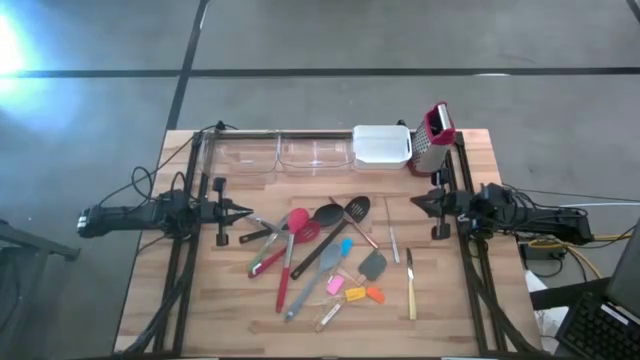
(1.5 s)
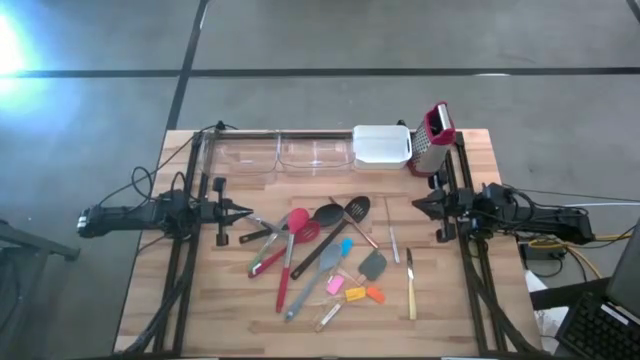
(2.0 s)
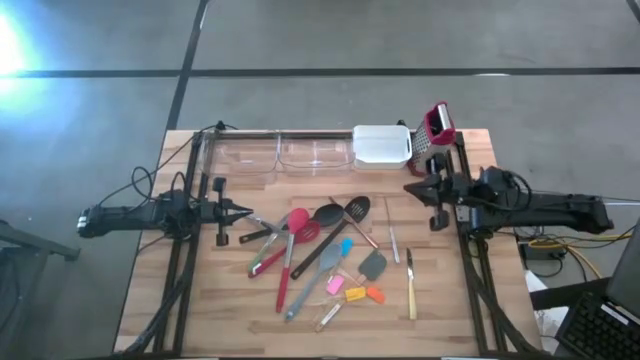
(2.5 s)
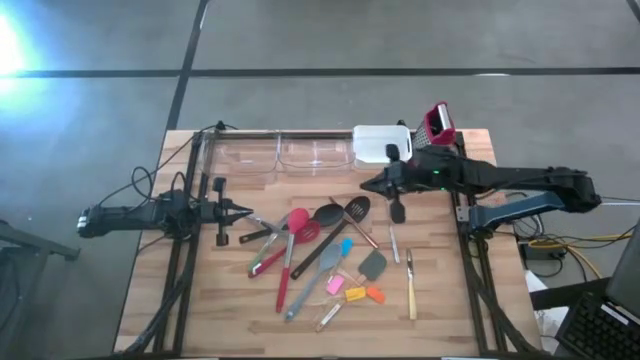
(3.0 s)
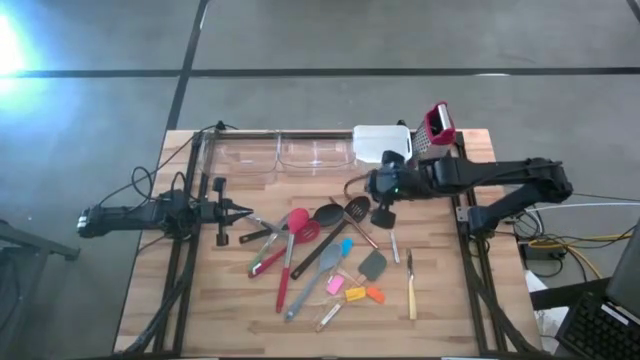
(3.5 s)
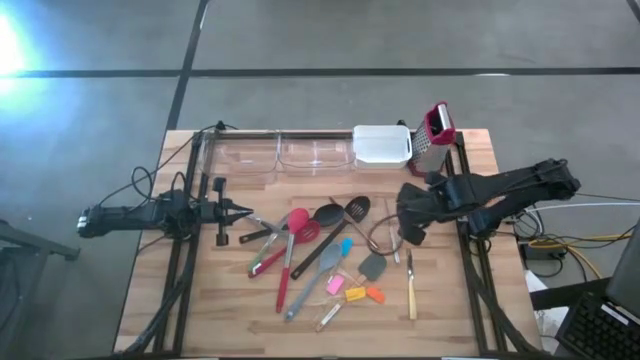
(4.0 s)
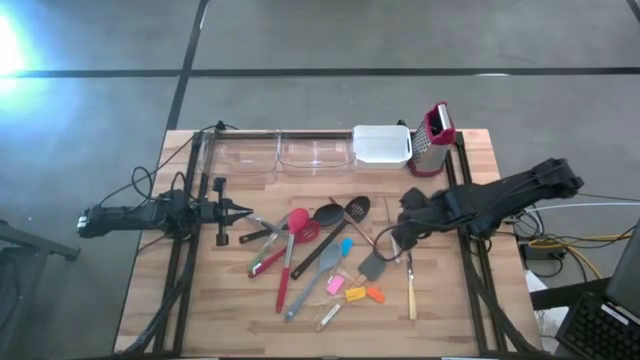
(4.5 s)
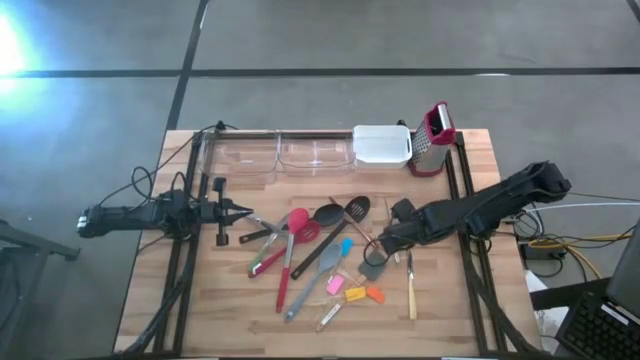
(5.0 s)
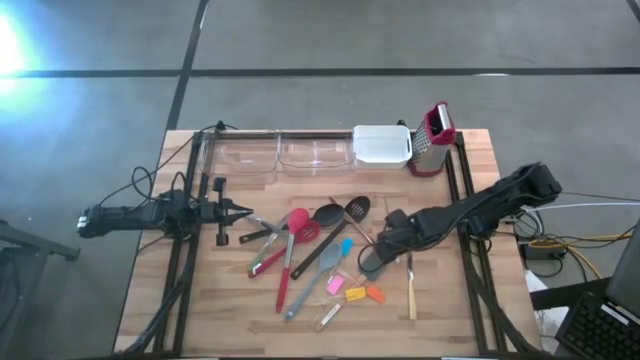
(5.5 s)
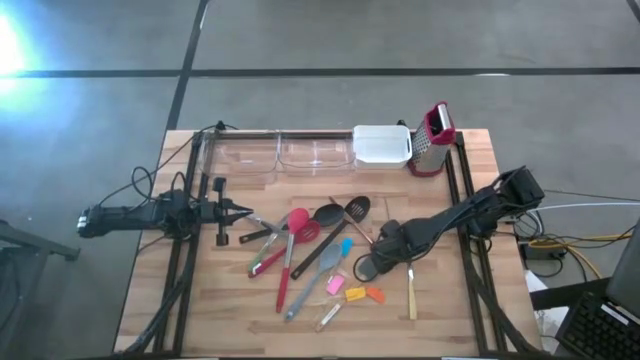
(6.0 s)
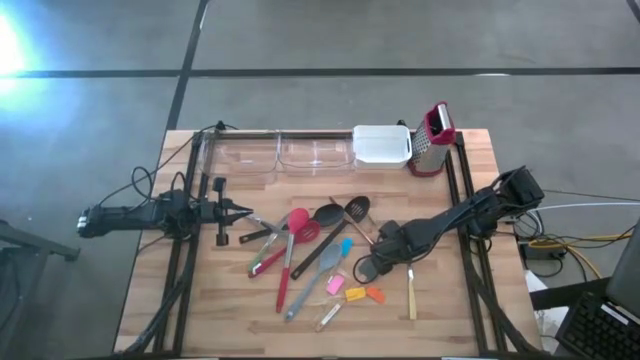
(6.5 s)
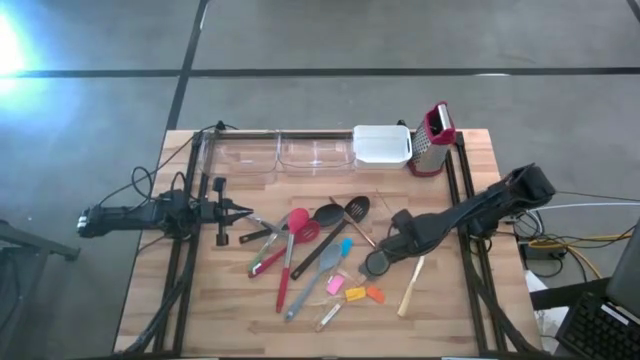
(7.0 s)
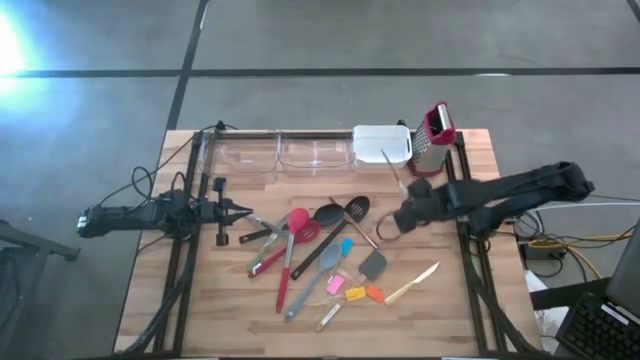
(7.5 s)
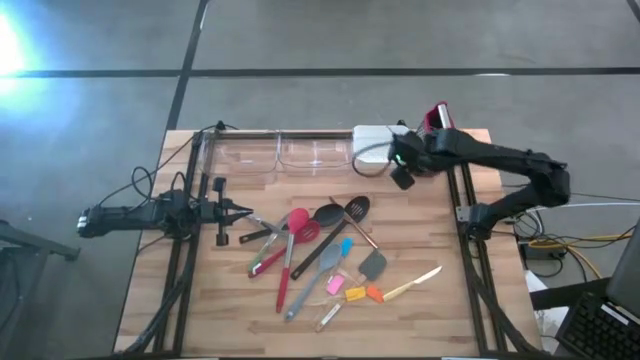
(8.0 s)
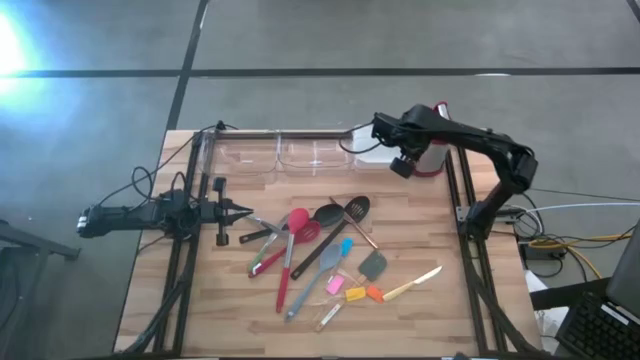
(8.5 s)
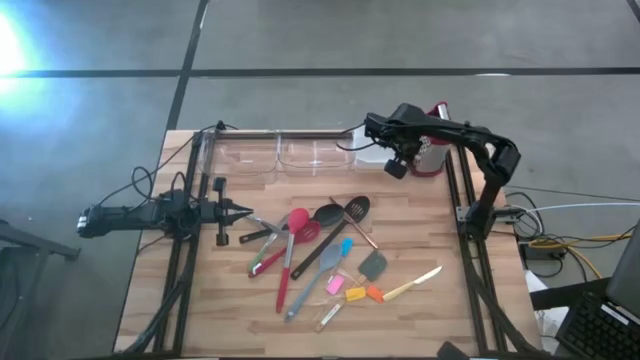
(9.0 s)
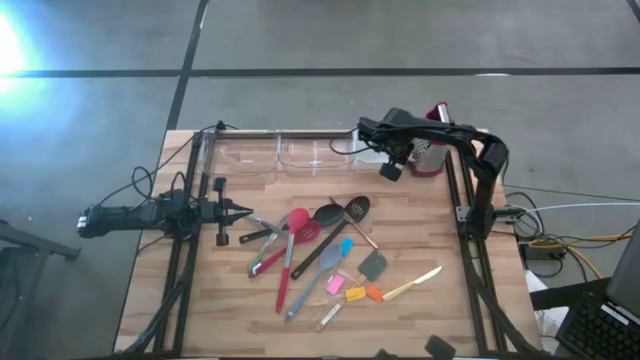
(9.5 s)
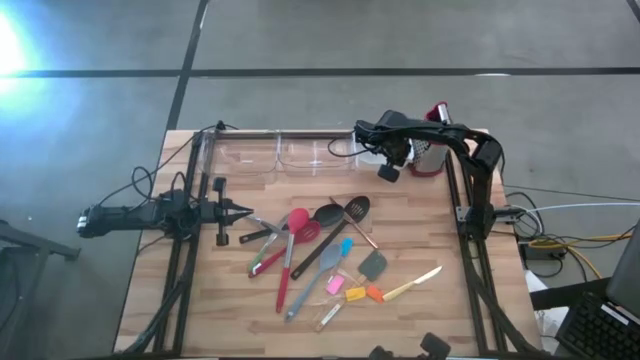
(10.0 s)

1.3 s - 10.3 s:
Task: Pick & Place Kitchen Items
Put the blue table knife into the white bin

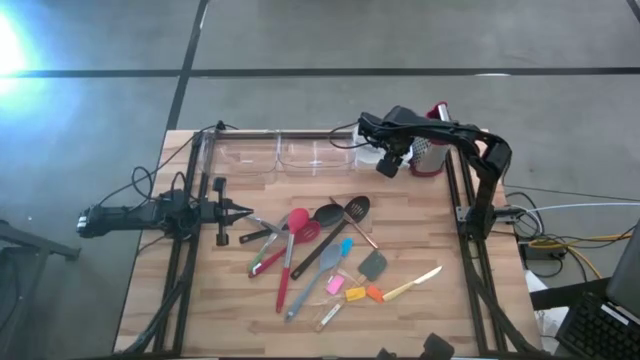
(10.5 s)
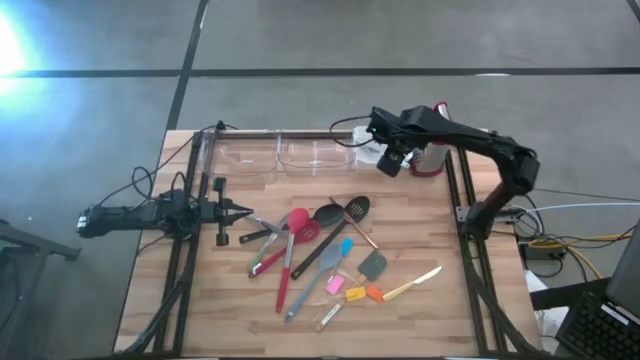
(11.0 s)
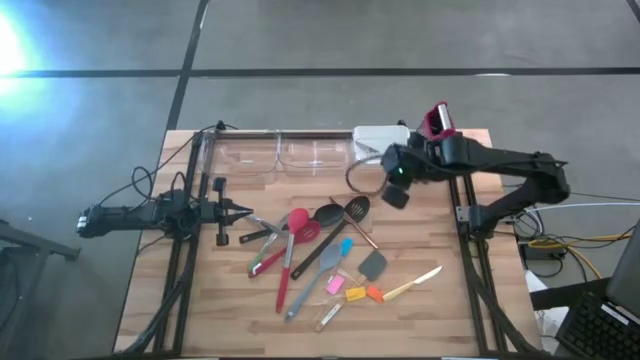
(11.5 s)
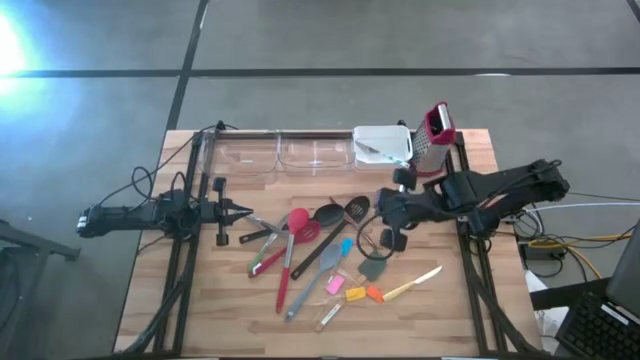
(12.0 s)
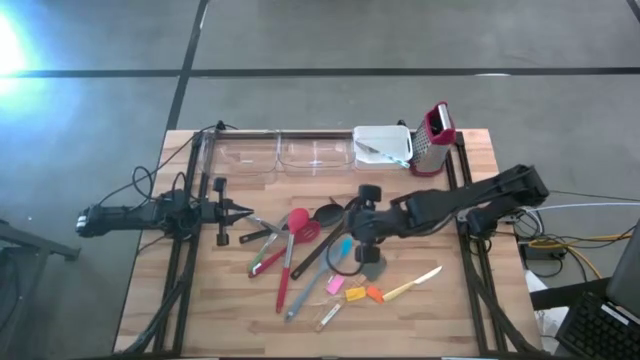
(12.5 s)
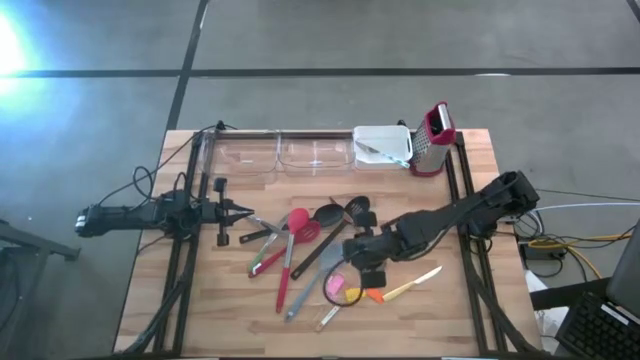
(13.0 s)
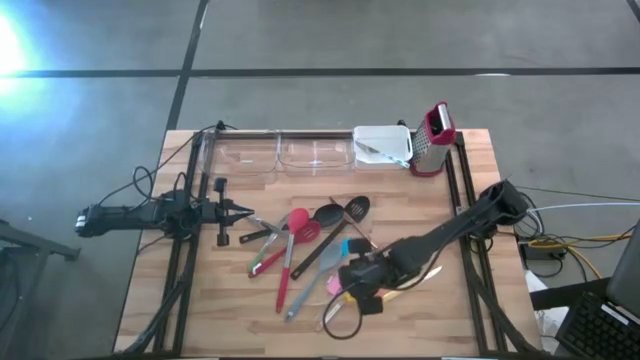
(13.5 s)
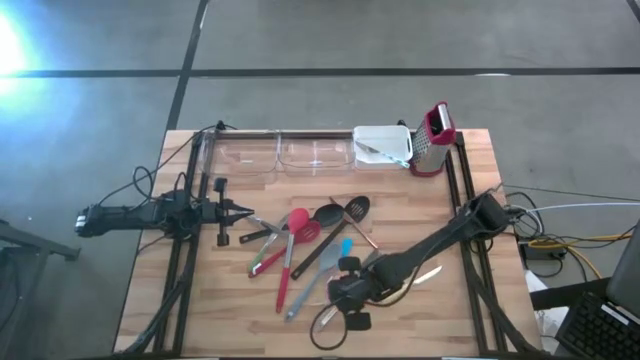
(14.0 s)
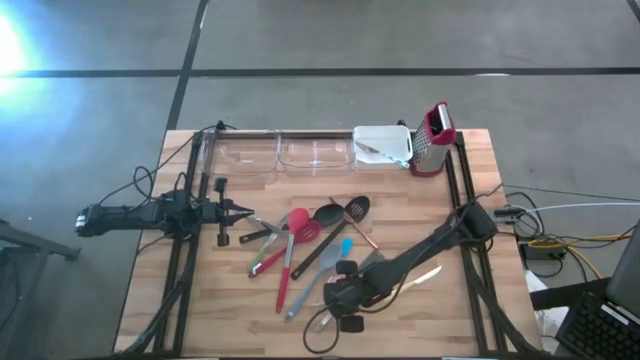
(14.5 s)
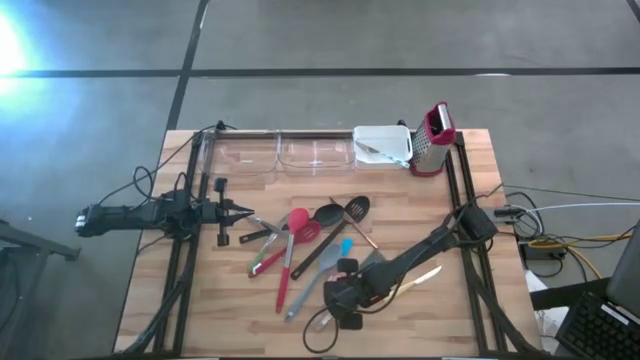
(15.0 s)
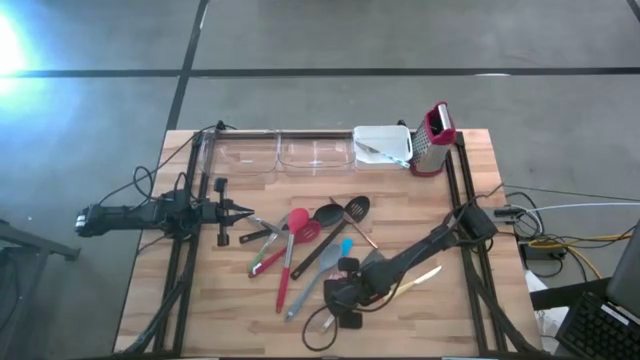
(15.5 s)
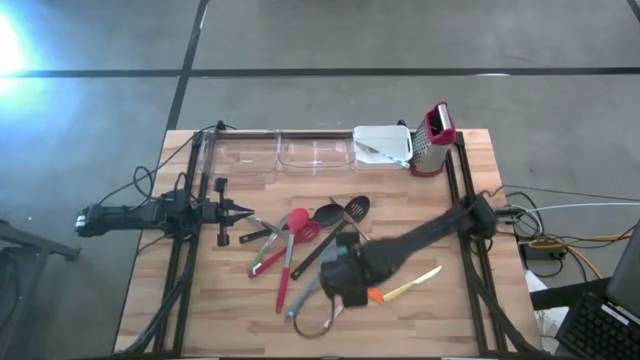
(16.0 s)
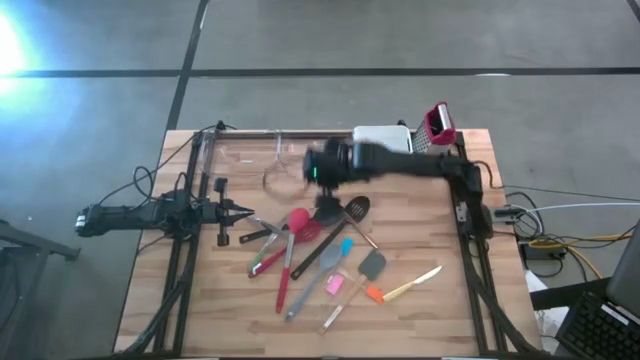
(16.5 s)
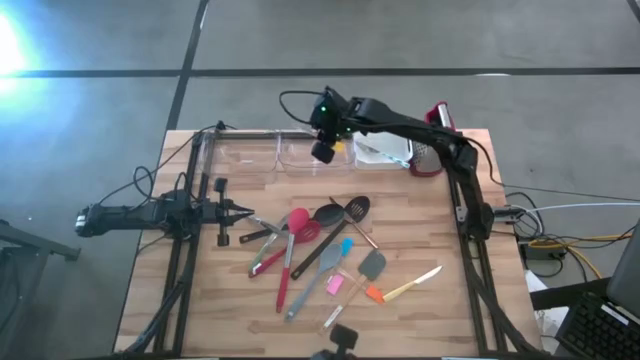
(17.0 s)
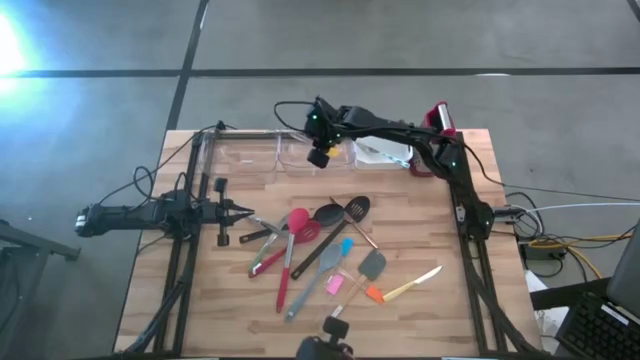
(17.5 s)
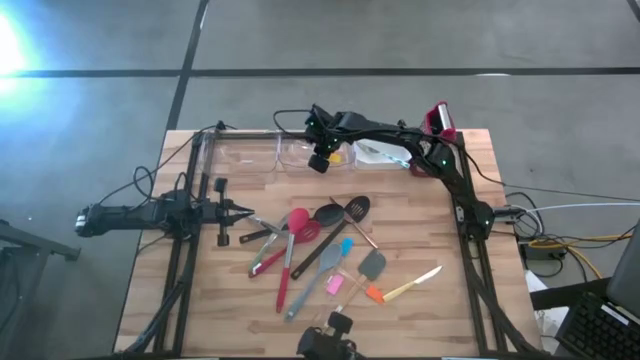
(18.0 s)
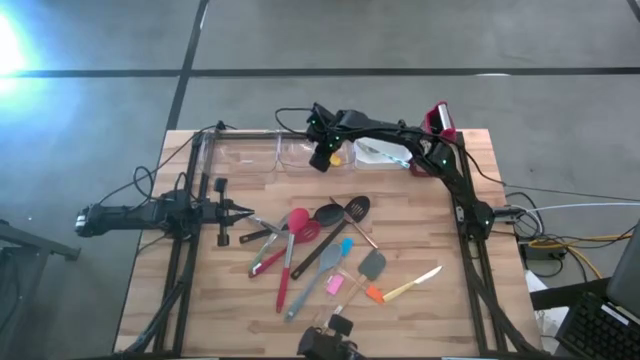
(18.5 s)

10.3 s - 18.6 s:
Put the yellow spatula into the right transparent bin

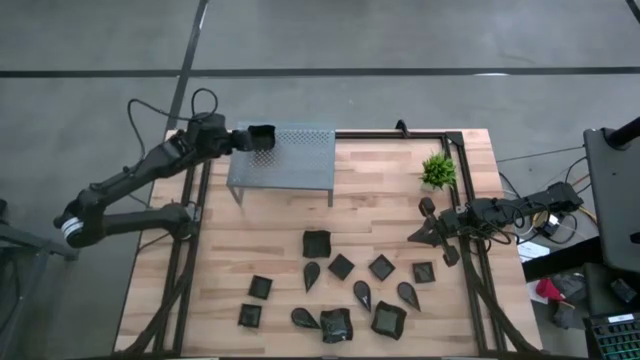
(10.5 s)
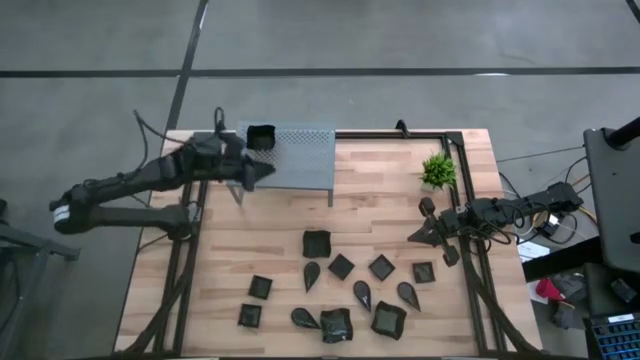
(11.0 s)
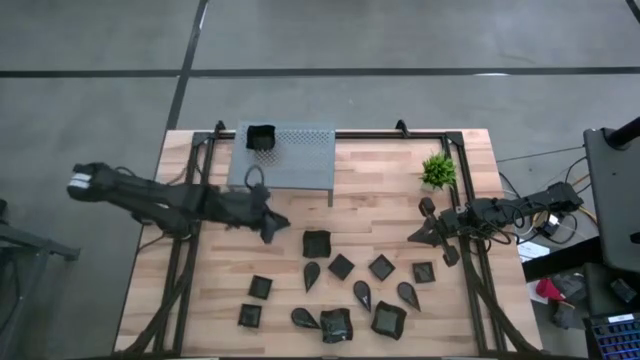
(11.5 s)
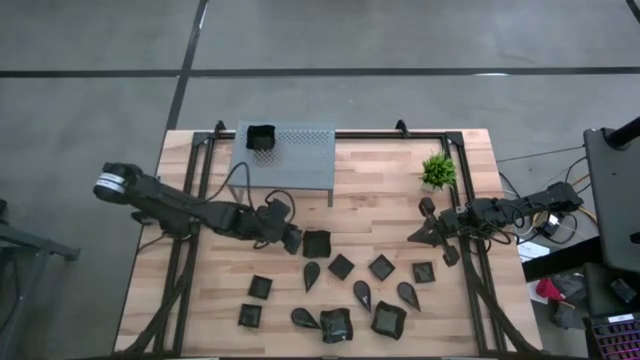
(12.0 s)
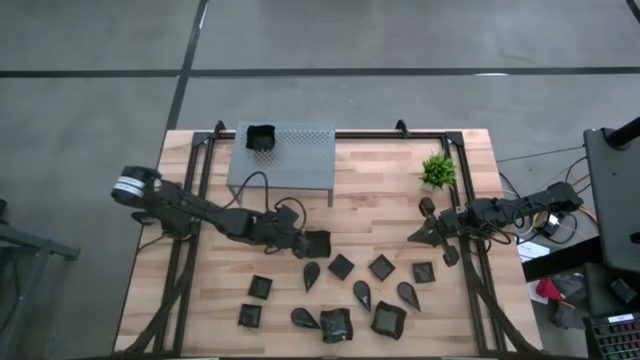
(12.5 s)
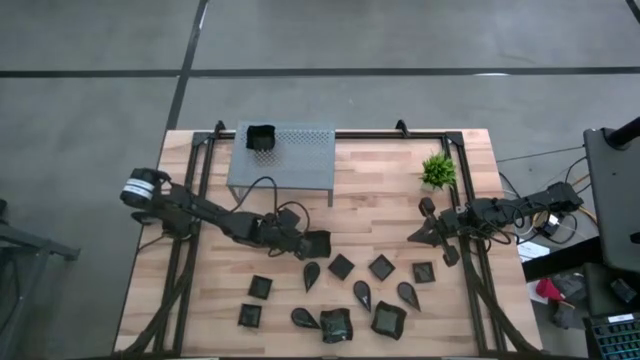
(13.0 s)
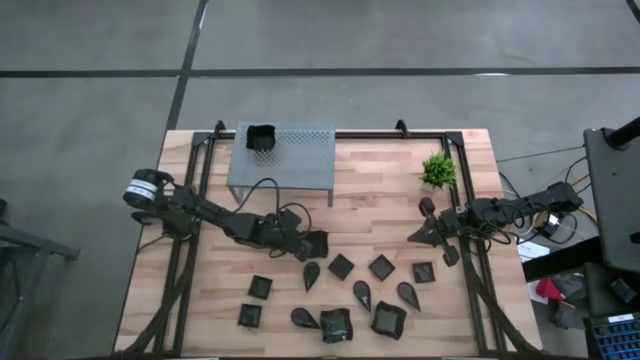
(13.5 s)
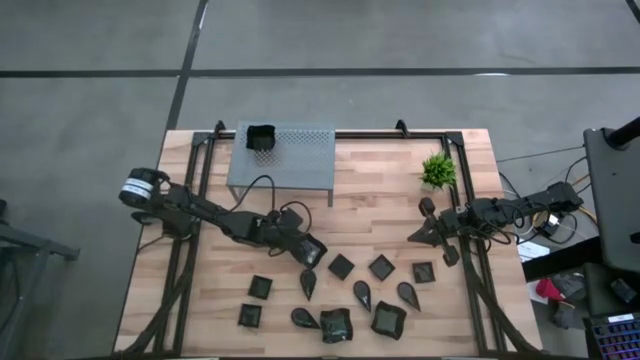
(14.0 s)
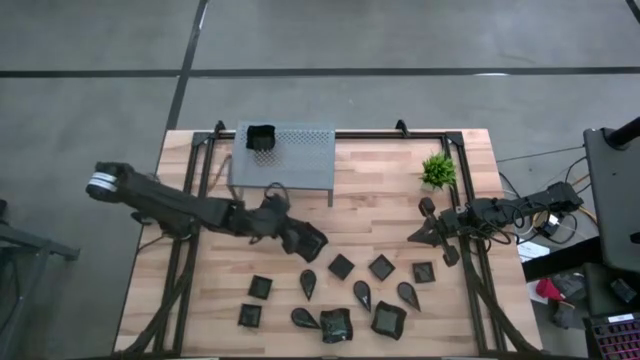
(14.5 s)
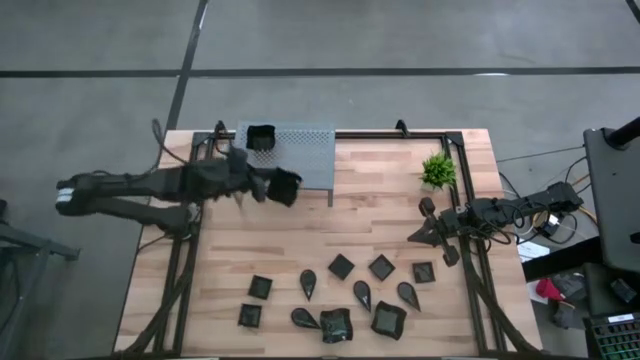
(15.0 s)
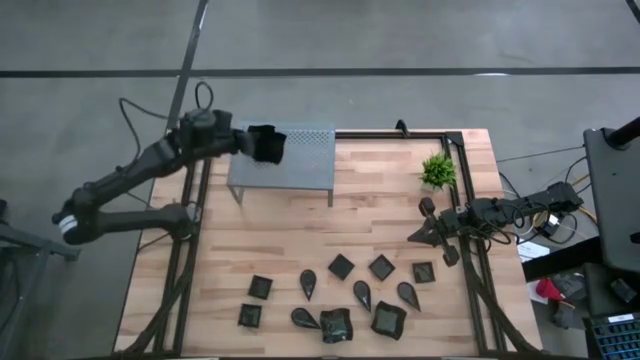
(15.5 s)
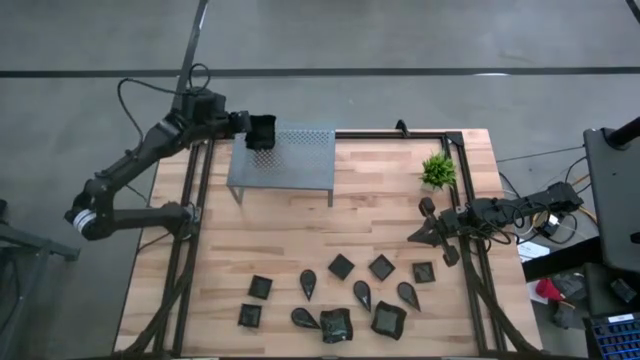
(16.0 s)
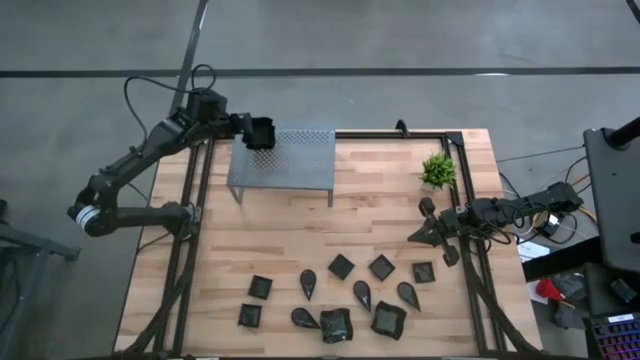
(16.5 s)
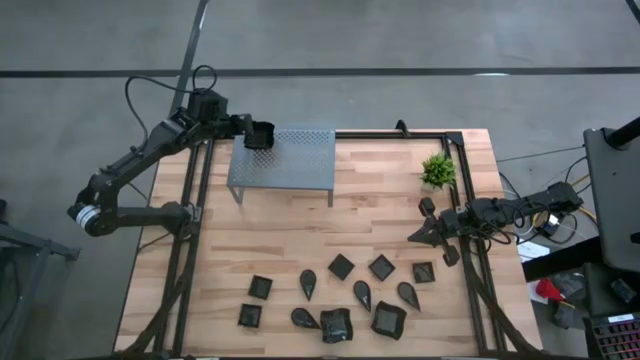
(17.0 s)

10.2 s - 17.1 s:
Task: Pick & Place Mini shaped plates
Stack the black distorted square plate on top of the black distorted square plate on the shelf
